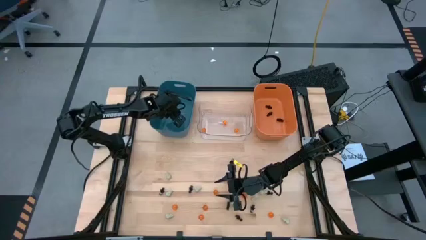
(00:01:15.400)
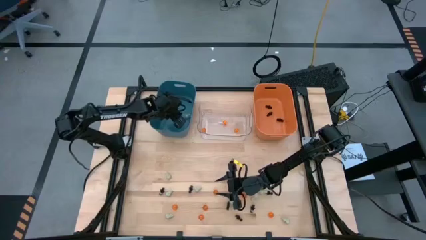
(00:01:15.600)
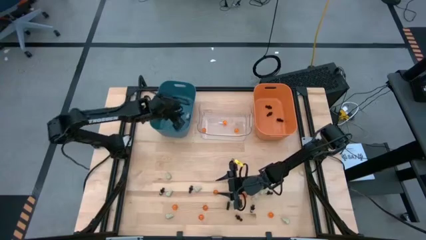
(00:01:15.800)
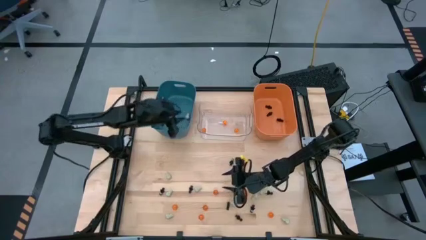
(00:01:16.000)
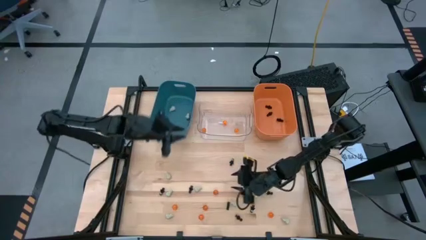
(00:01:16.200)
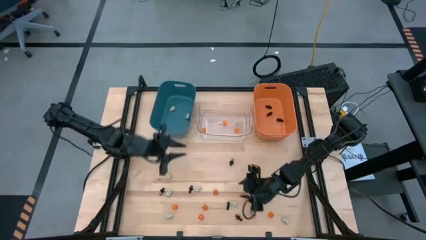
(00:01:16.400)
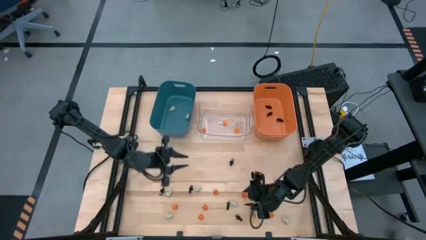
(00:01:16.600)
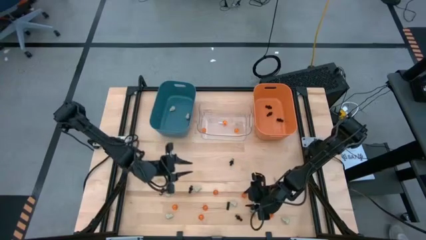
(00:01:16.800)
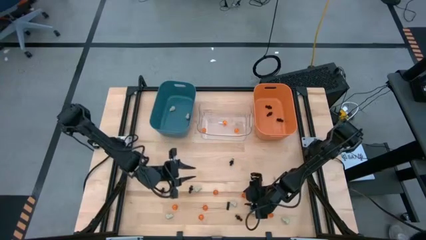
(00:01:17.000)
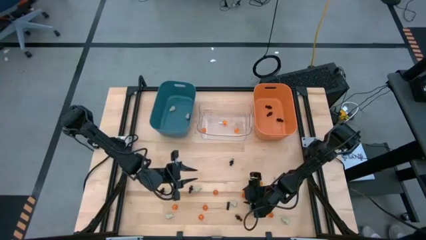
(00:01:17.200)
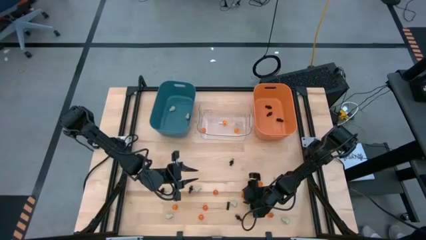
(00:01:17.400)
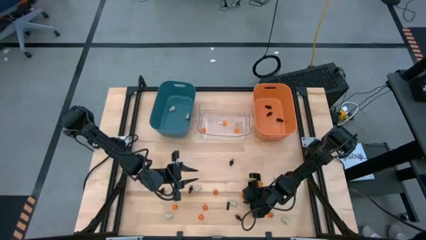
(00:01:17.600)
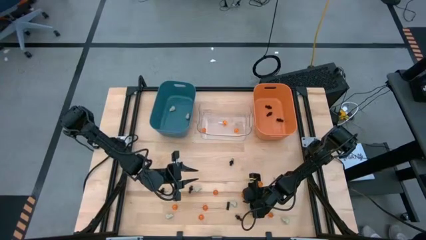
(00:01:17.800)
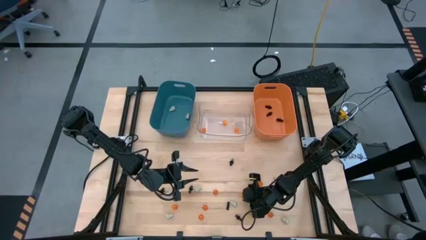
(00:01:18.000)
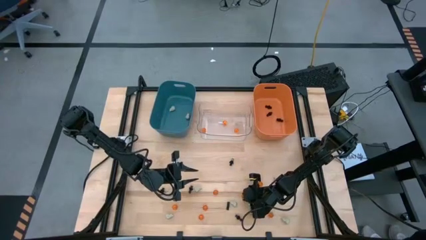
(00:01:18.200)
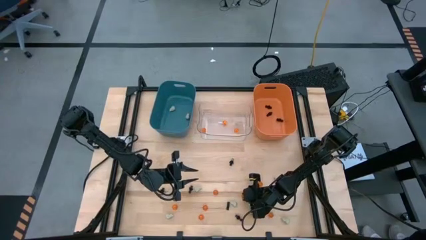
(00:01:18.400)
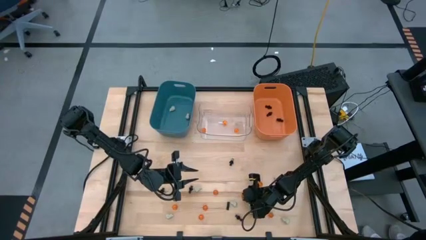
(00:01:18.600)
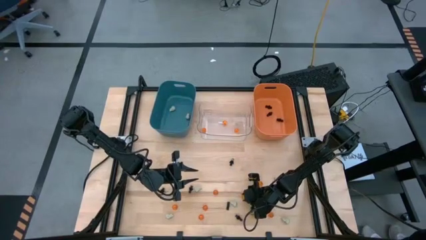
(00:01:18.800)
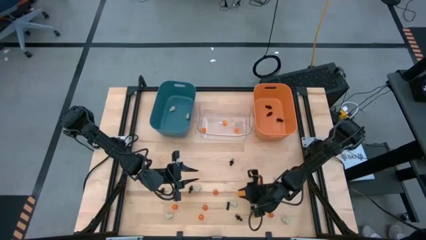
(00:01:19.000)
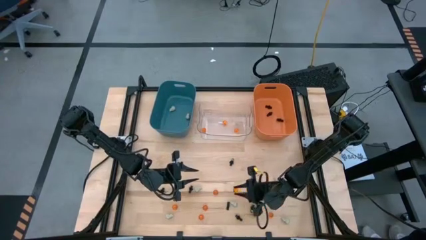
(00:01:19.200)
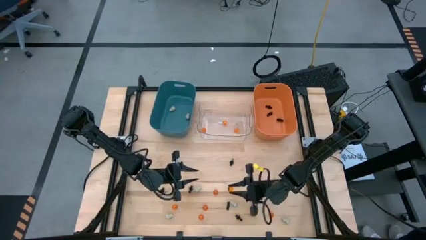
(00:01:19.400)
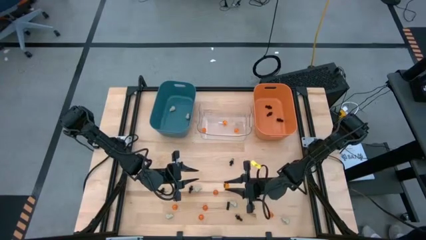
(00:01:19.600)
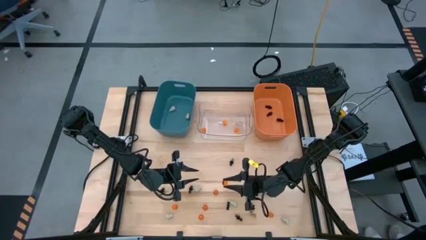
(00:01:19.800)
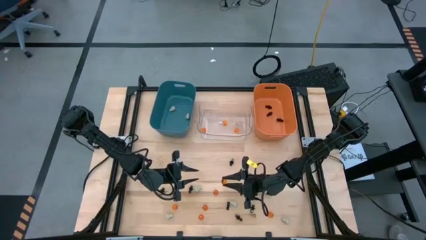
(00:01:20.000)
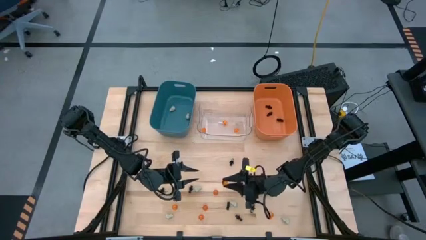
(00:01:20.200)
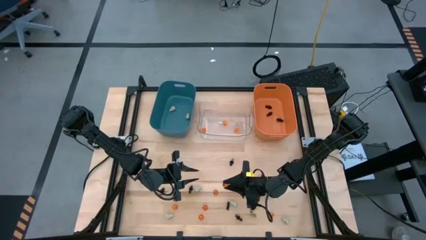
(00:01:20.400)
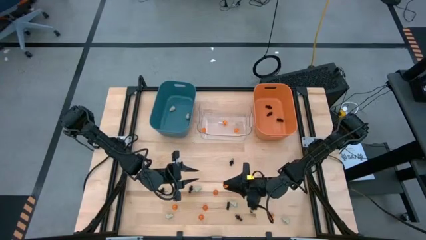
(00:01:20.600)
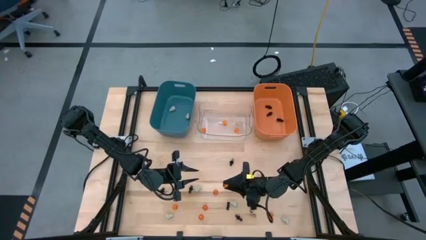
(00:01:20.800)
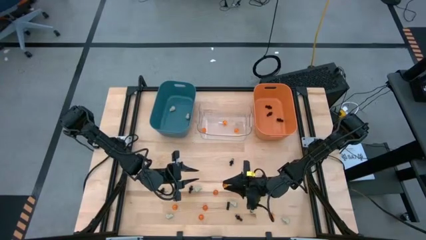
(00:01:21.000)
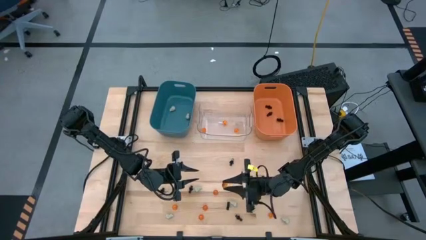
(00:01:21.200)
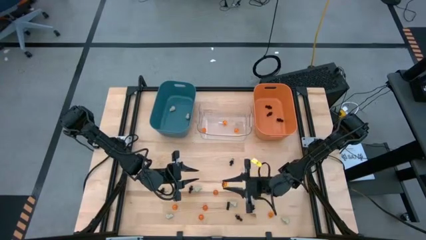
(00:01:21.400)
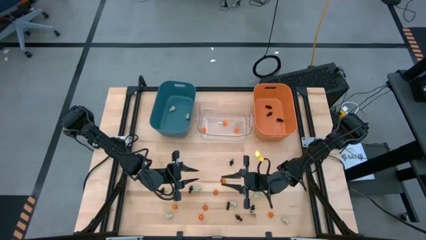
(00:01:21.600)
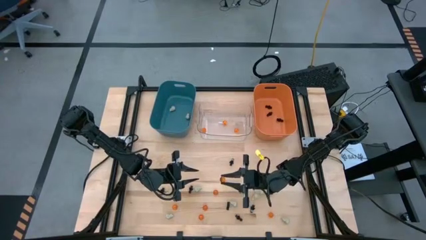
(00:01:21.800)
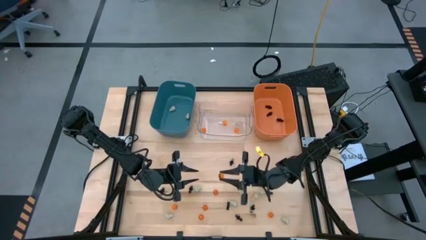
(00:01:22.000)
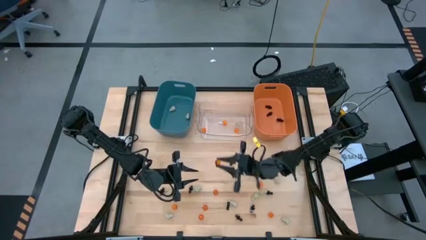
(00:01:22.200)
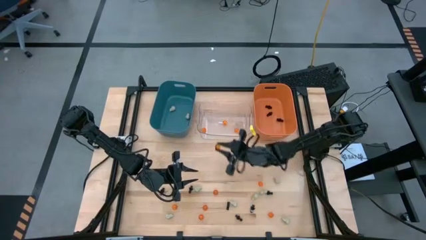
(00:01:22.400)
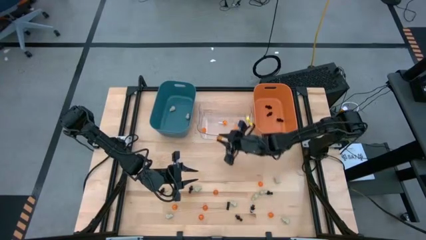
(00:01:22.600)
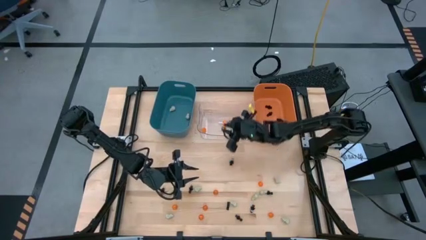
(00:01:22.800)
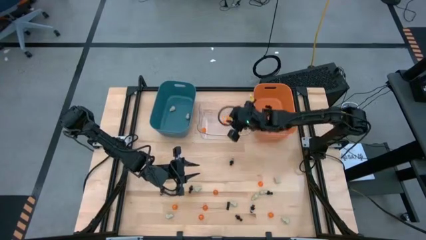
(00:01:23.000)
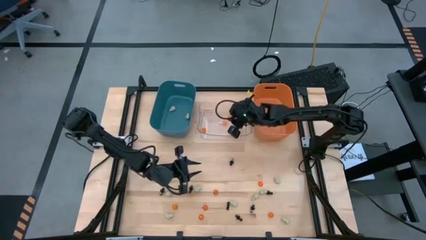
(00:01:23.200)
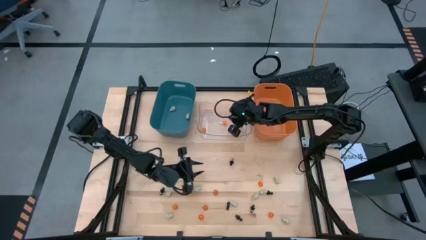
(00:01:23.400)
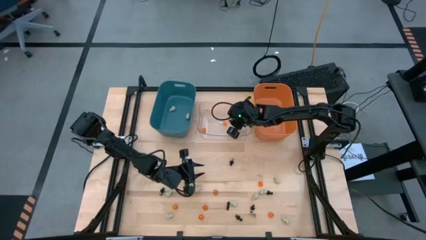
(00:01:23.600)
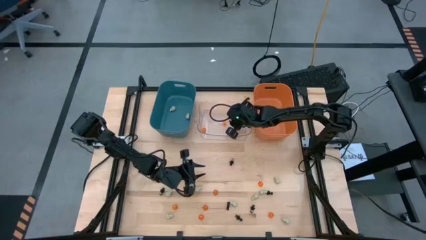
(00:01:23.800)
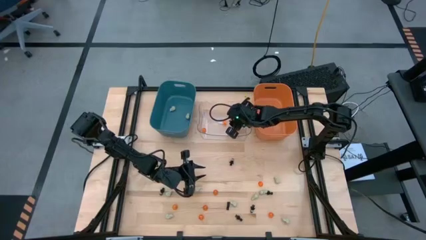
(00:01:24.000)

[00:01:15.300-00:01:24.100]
Task: Sort Halloween decoration
Put the orange pumpkin toy into the transparent bin

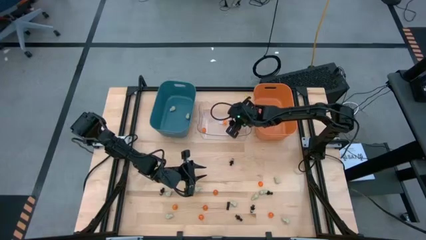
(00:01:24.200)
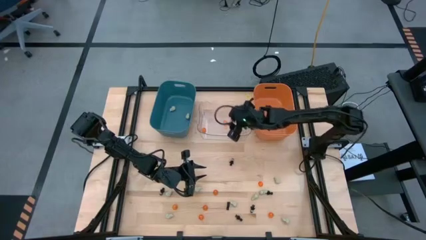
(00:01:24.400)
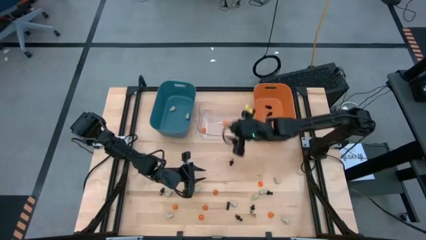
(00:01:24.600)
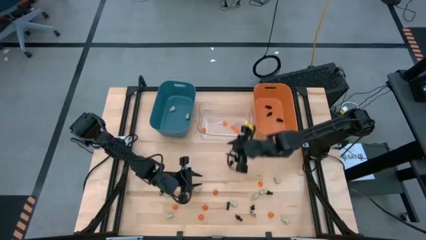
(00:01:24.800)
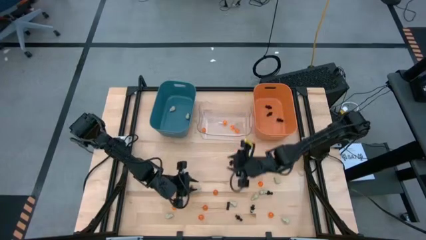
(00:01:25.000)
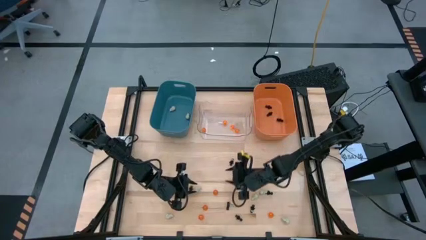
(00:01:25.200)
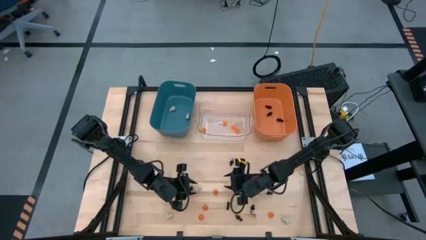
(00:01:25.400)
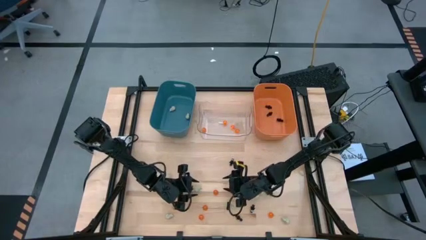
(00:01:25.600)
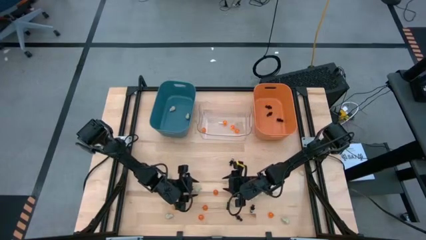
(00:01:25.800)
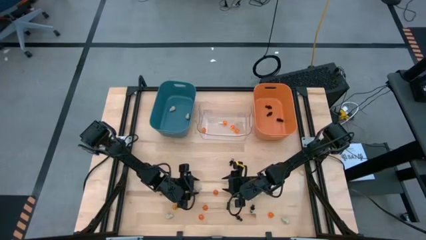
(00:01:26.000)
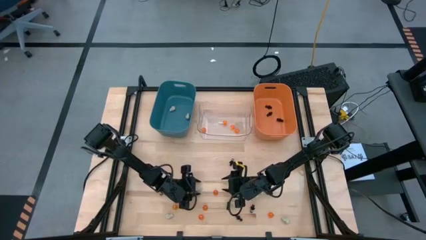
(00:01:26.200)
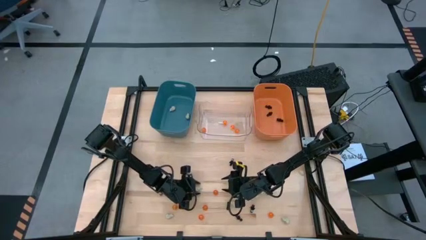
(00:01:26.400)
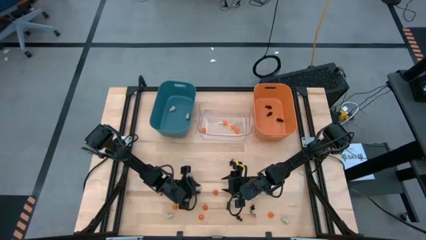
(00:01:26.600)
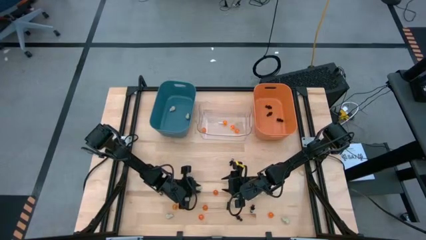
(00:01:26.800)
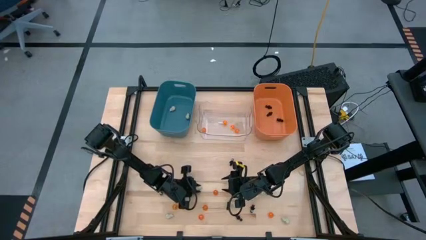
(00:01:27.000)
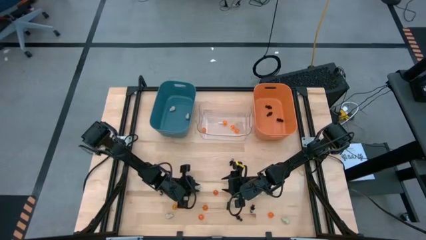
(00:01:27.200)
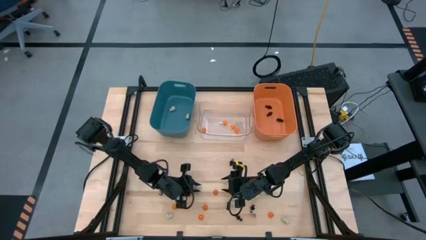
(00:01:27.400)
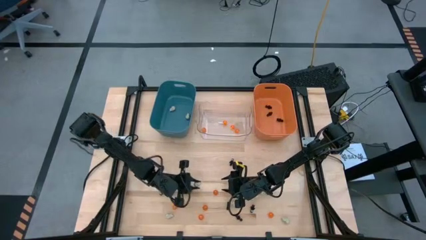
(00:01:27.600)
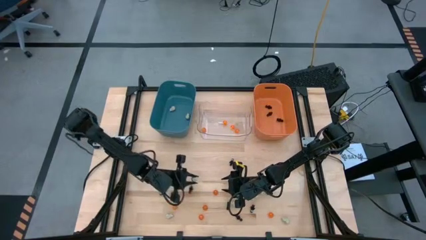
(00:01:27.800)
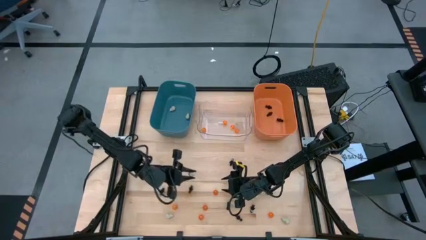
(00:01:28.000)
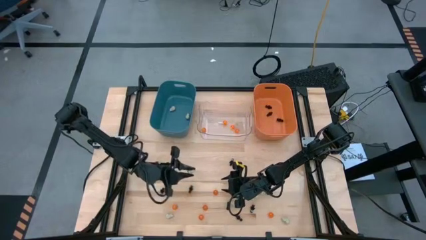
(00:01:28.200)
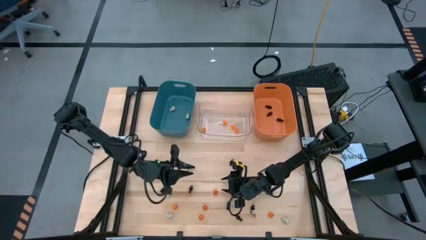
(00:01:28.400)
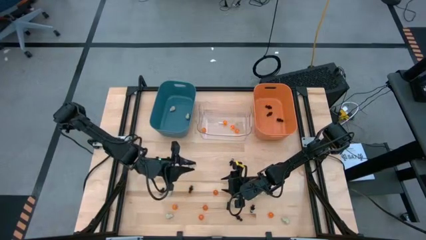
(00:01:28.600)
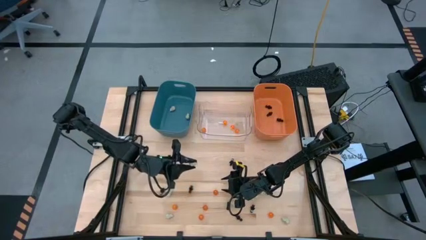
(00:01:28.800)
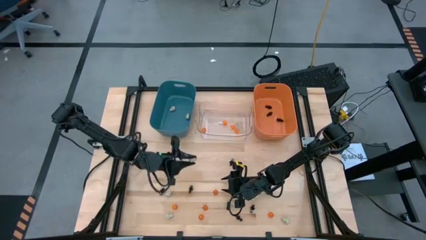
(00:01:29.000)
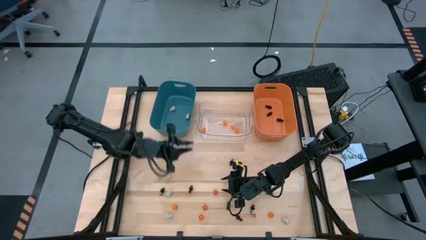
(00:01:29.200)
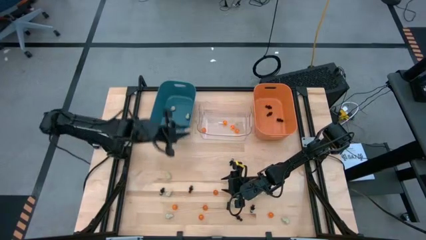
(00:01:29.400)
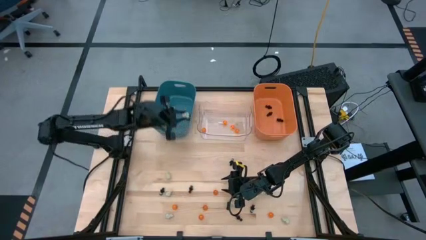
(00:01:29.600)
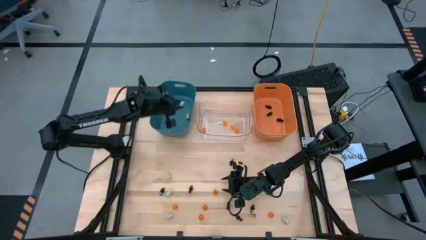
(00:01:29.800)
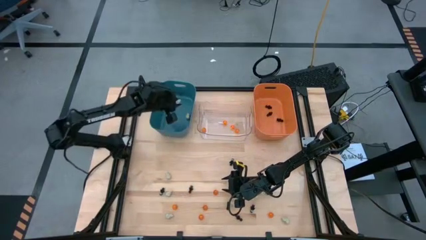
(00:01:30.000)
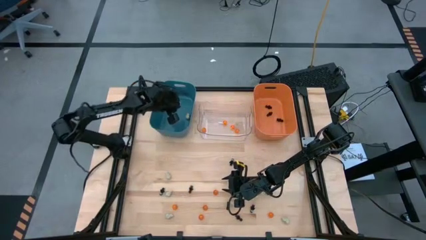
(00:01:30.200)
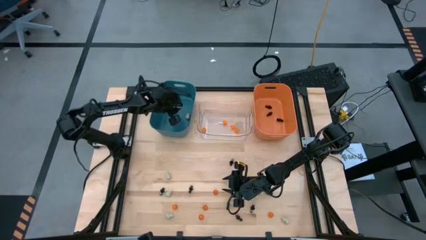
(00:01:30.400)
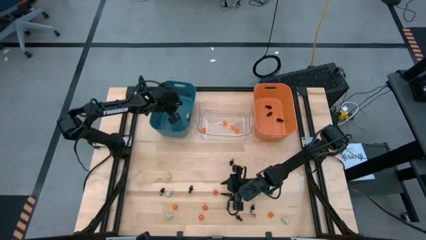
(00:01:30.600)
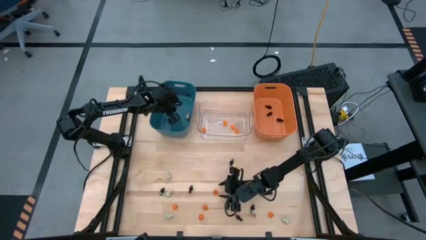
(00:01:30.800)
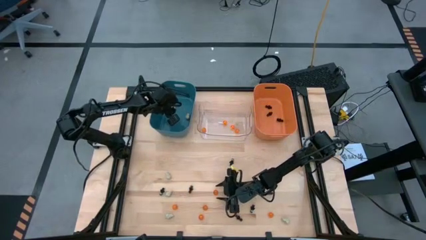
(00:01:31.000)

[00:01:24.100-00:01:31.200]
Put the white skull toy into the blue bin

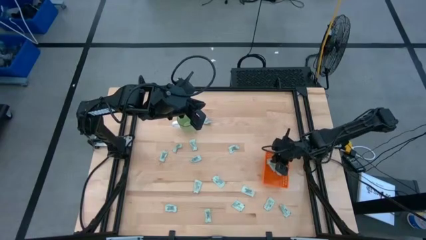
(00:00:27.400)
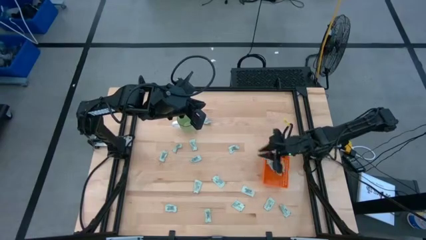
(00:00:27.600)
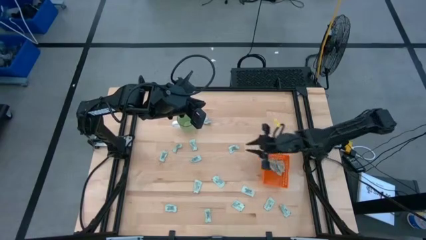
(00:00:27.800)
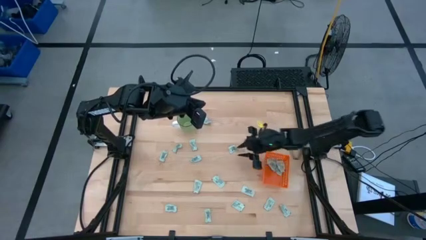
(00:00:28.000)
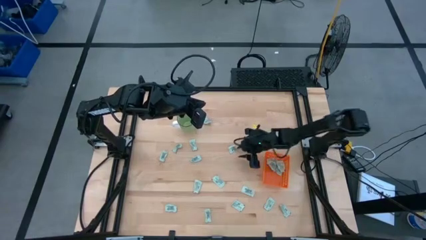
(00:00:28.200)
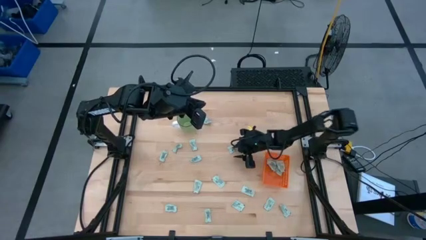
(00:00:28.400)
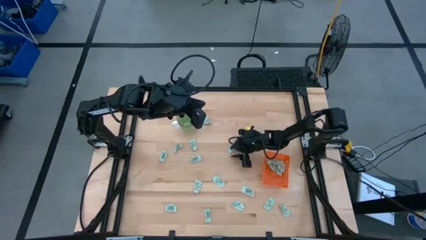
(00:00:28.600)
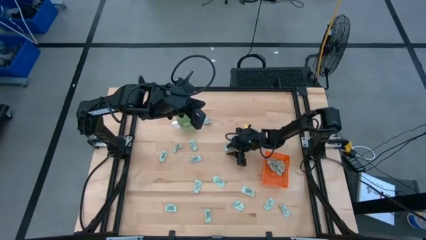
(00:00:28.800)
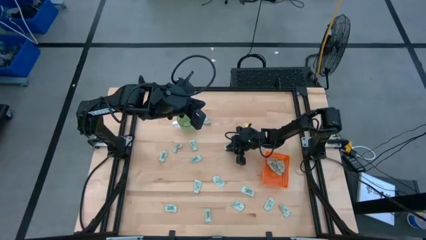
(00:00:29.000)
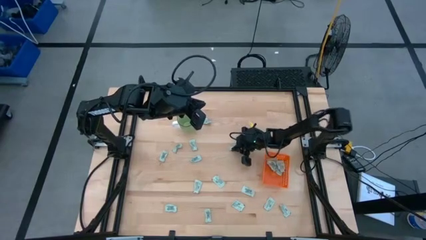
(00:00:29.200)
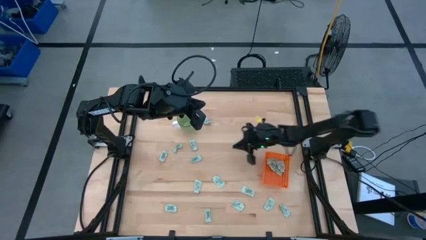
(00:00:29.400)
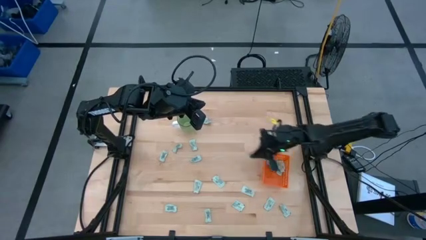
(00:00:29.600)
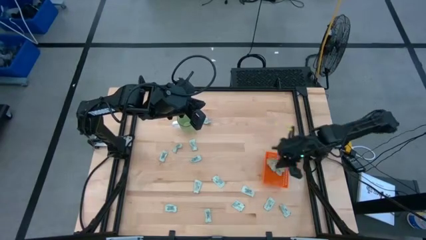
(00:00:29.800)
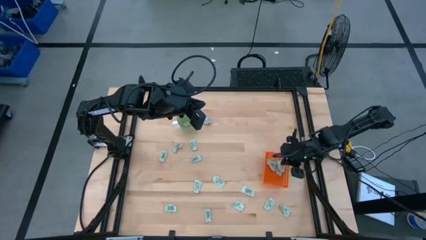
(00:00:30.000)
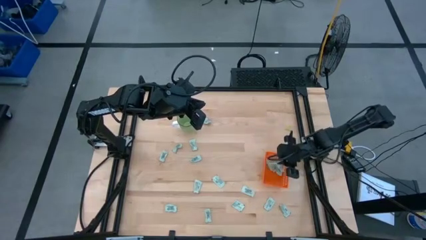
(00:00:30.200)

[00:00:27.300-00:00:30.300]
Task: Pick and place Stevia / Truvia into bins
Put the stevia packet into the orange basket
